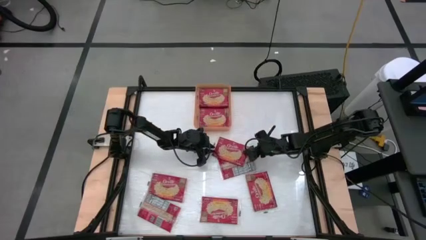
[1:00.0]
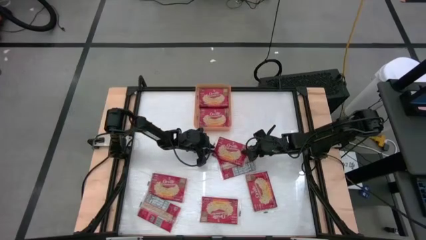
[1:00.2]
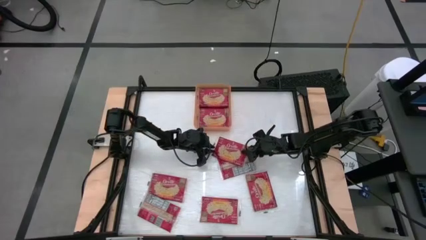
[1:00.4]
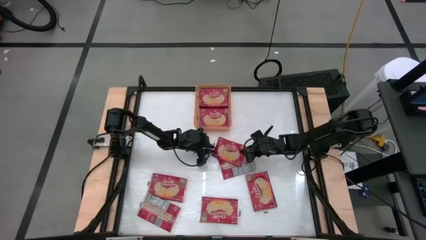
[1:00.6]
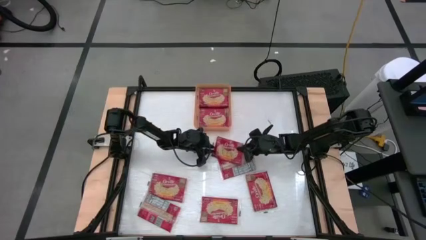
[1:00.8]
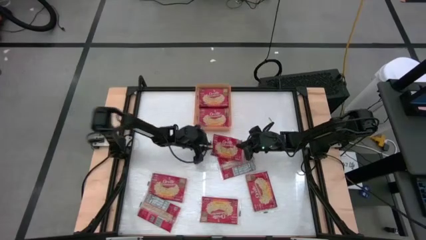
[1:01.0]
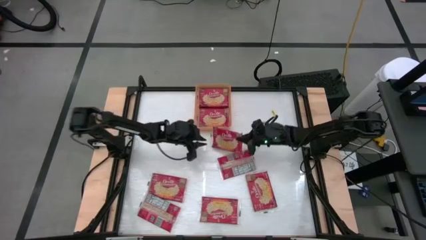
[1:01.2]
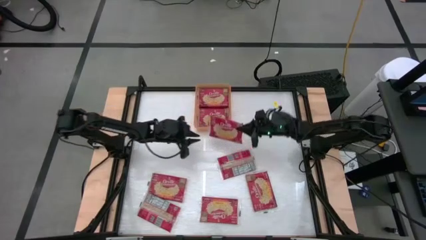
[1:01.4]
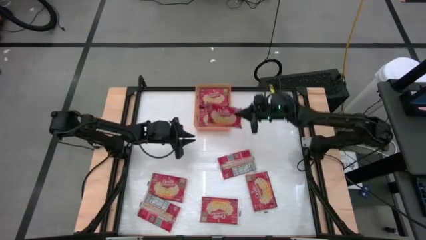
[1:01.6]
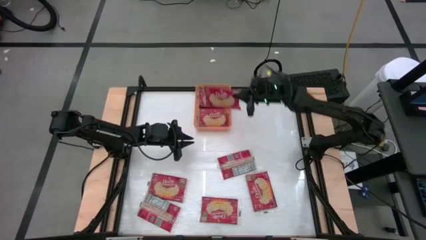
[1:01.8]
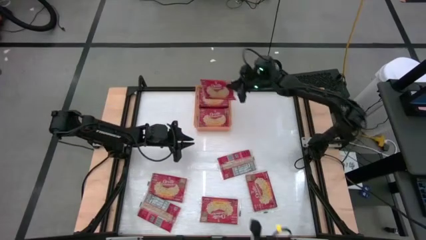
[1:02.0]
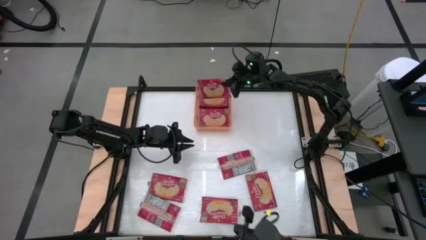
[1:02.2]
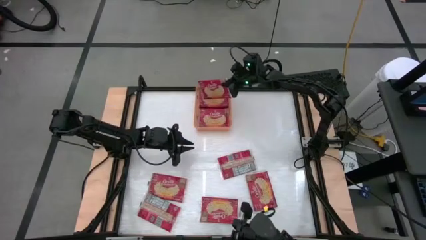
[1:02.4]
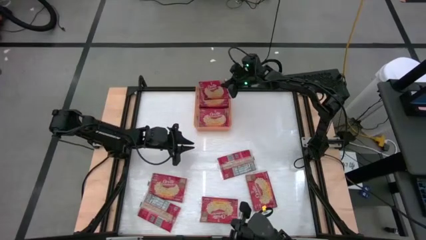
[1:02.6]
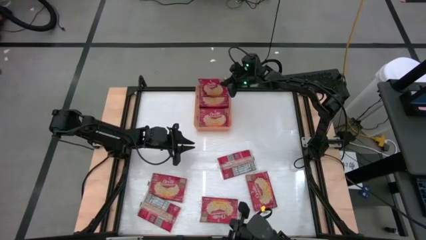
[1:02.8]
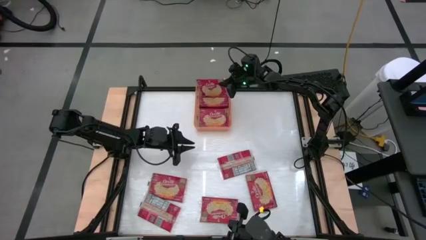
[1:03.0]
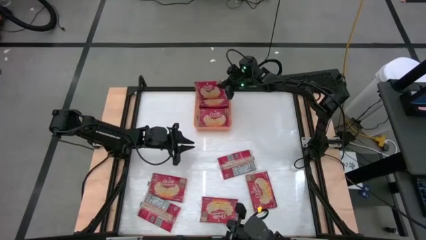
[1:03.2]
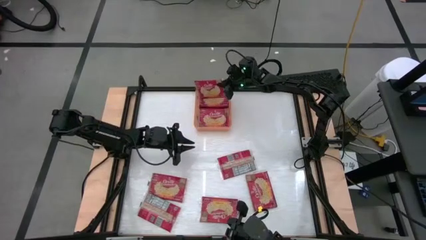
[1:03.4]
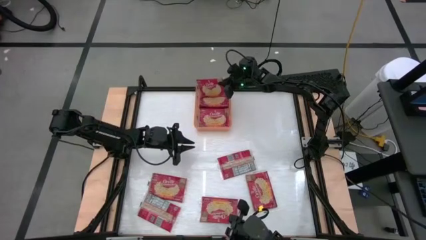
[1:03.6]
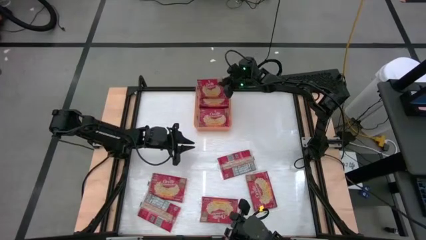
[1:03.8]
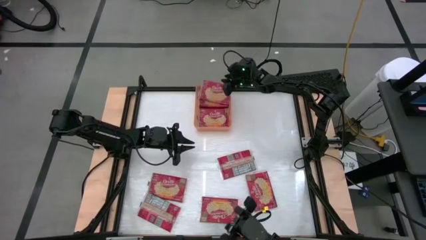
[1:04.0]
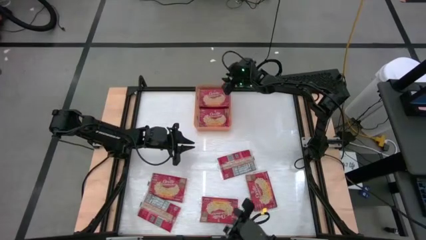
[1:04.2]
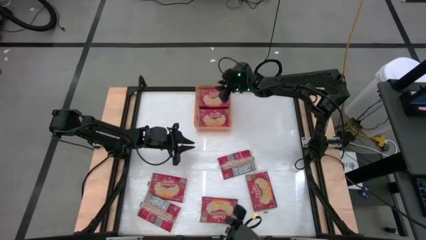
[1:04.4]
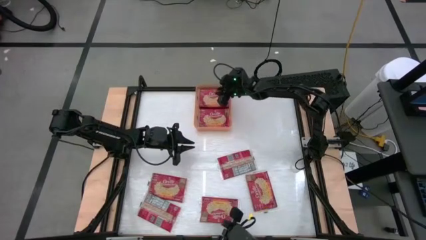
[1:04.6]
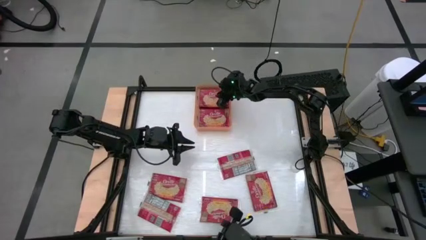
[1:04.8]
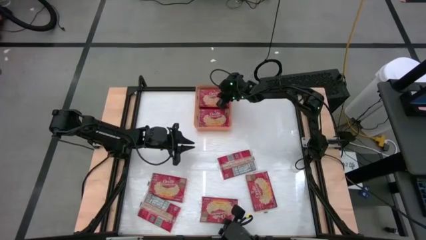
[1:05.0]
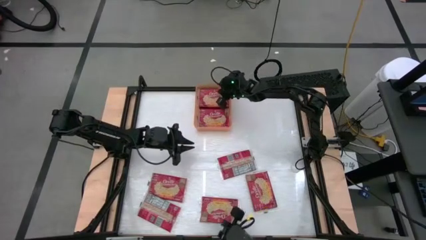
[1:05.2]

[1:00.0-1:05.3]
Task: Sort popcorn bags into baskets
Put the red popcorn bag into the orange bin

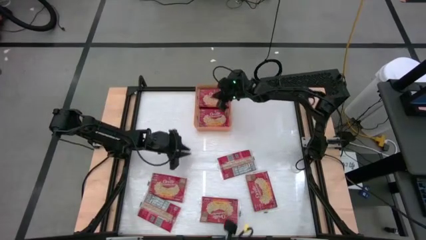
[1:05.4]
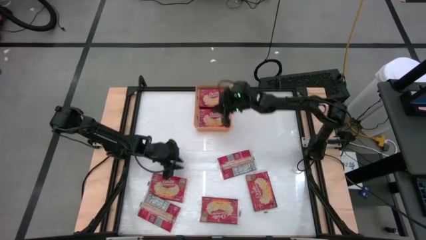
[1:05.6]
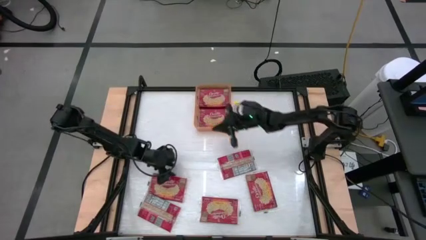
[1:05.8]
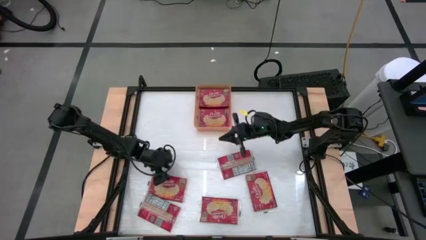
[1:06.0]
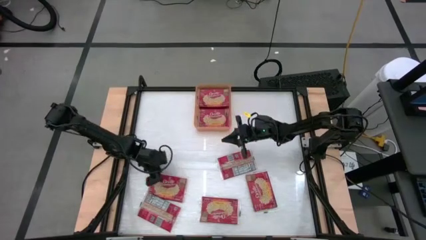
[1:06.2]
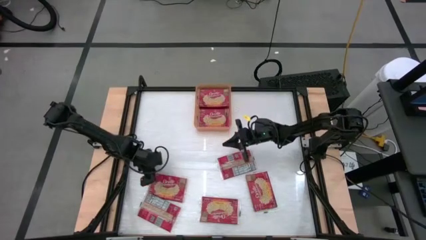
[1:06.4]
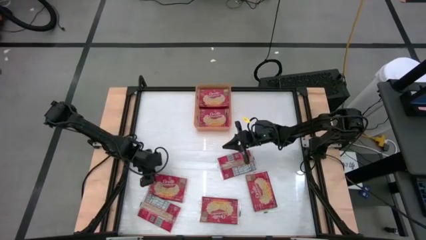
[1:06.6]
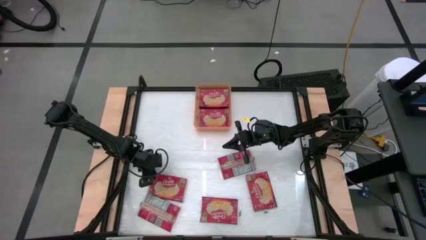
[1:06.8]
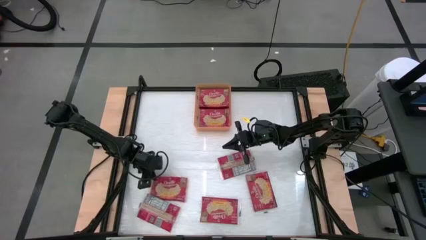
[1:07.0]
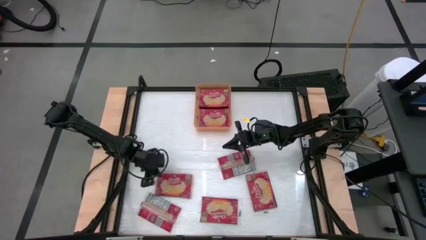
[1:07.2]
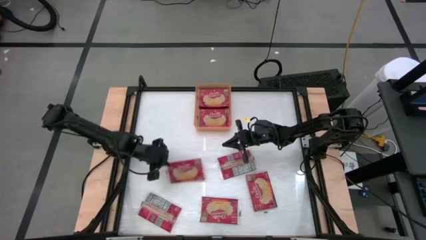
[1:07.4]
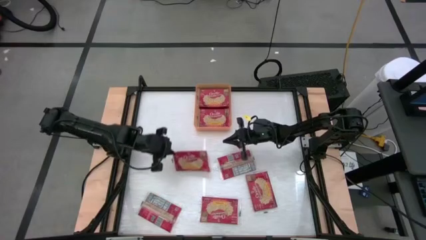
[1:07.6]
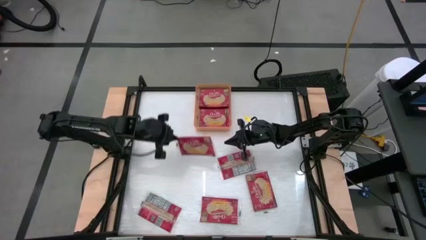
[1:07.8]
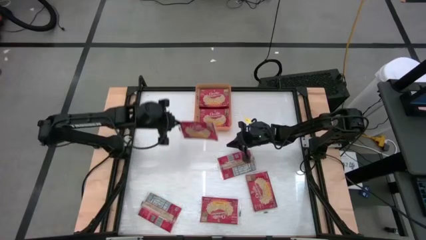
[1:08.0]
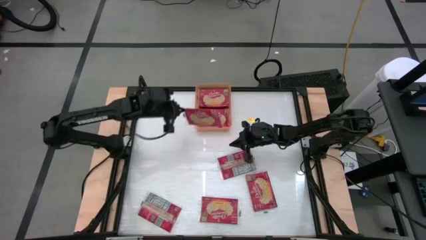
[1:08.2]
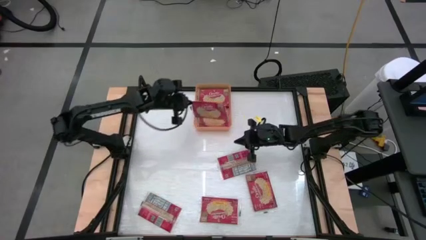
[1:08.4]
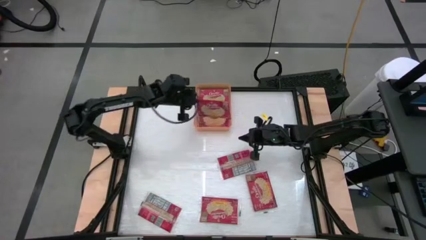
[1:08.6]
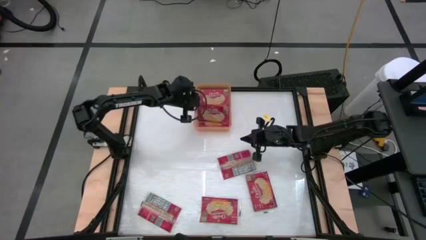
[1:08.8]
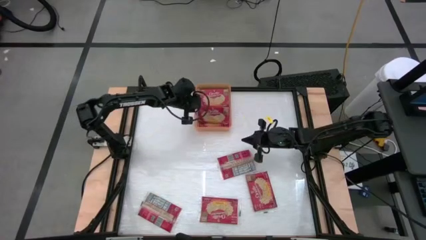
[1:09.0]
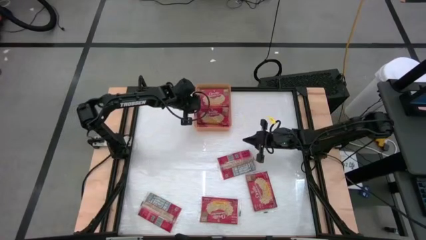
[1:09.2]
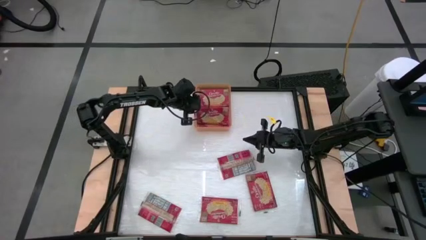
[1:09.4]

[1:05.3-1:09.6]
Put the red popcorn bag into the orange bin

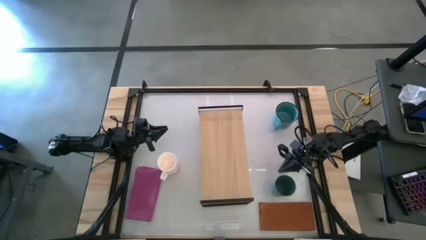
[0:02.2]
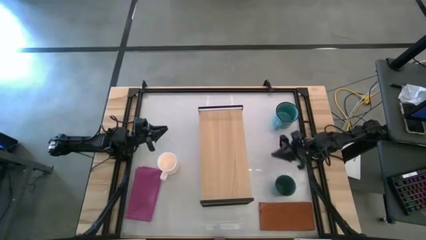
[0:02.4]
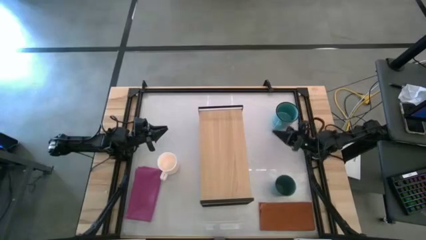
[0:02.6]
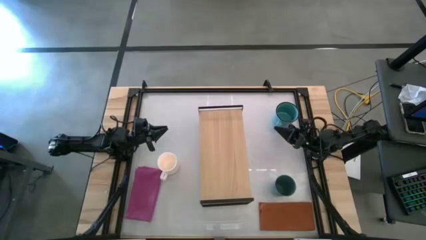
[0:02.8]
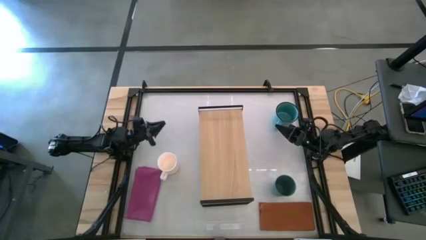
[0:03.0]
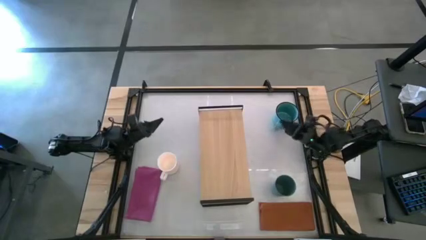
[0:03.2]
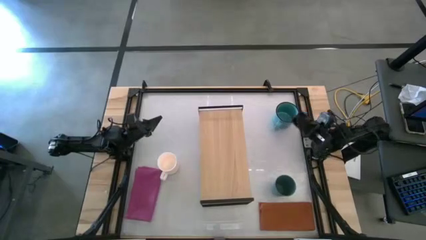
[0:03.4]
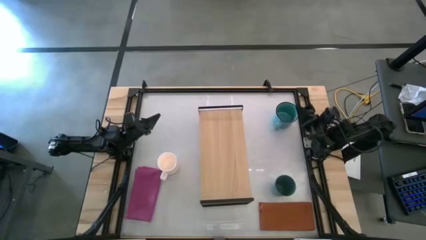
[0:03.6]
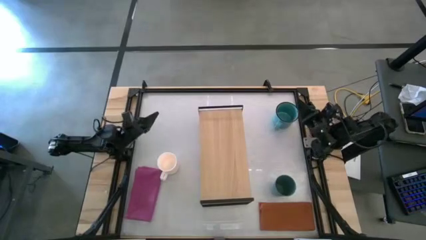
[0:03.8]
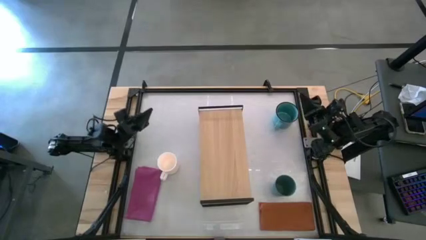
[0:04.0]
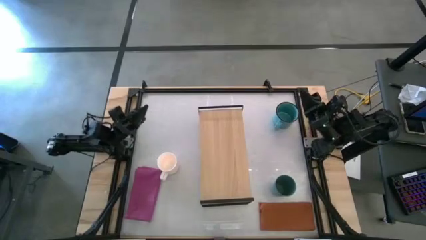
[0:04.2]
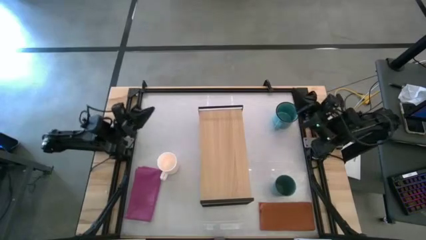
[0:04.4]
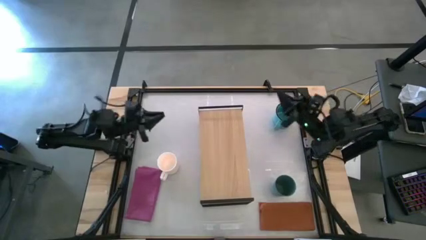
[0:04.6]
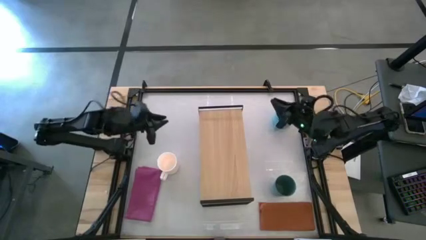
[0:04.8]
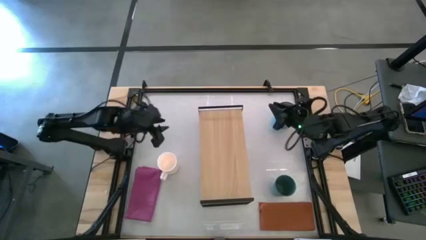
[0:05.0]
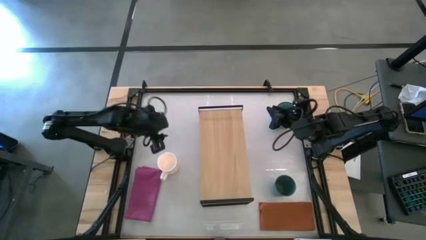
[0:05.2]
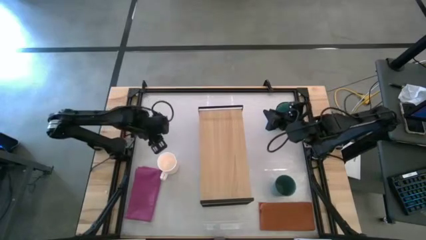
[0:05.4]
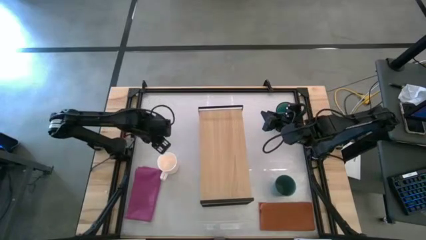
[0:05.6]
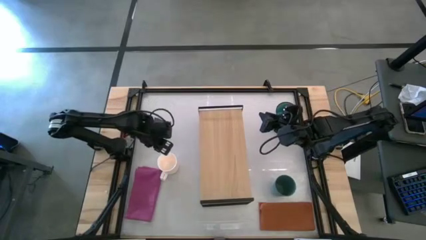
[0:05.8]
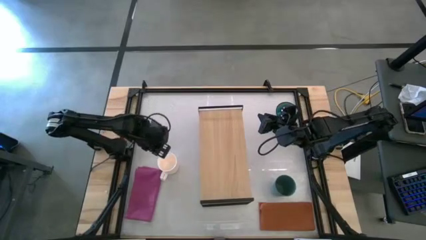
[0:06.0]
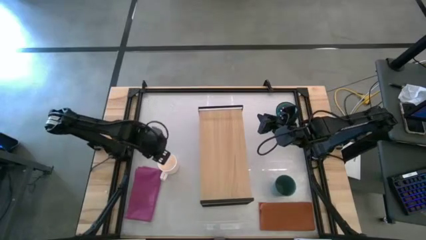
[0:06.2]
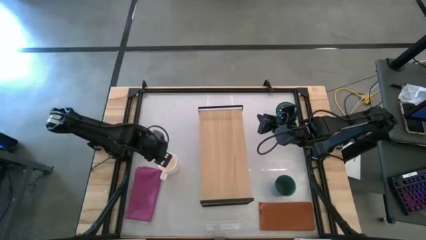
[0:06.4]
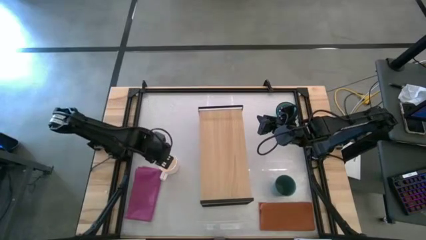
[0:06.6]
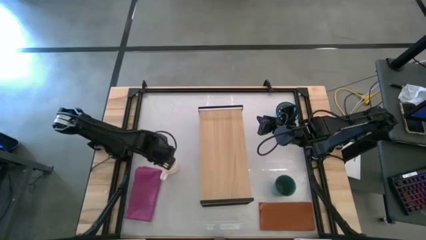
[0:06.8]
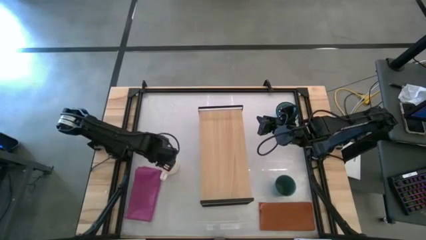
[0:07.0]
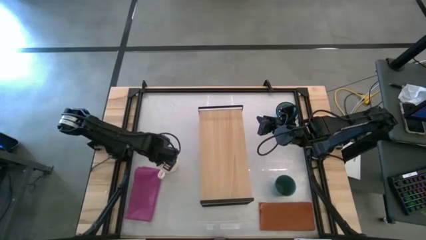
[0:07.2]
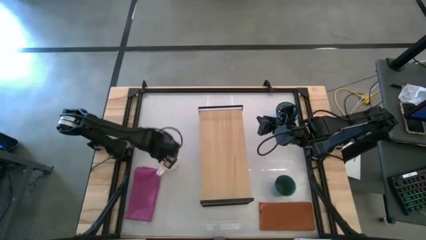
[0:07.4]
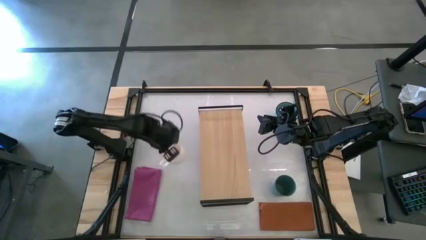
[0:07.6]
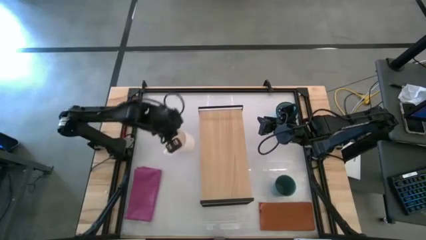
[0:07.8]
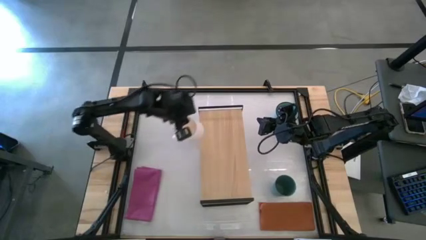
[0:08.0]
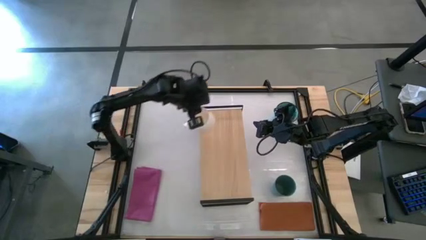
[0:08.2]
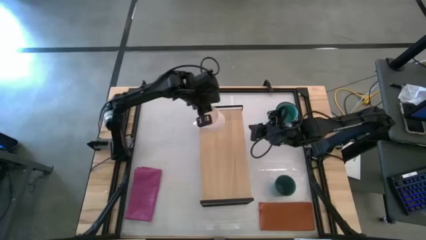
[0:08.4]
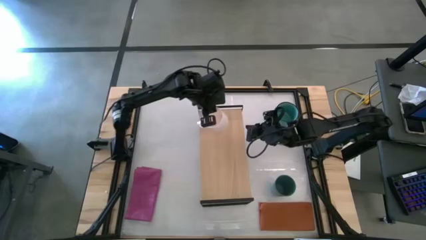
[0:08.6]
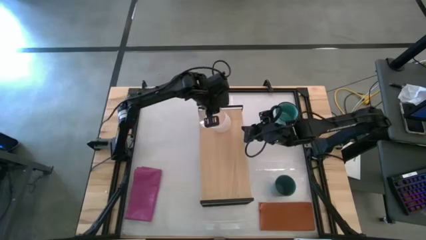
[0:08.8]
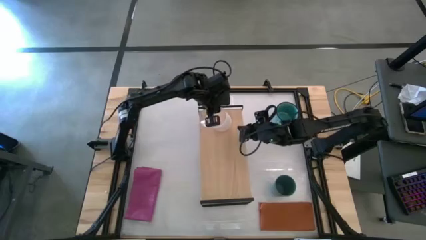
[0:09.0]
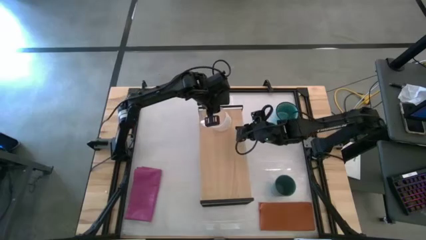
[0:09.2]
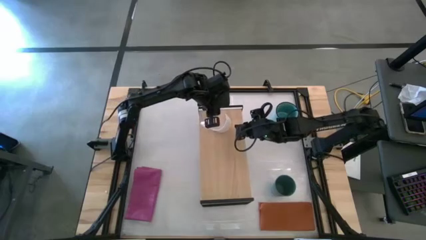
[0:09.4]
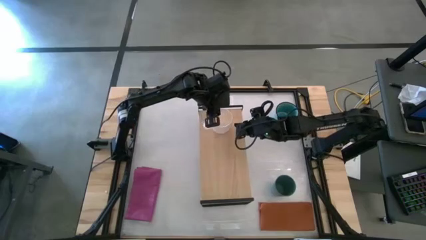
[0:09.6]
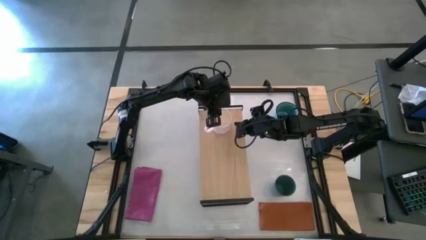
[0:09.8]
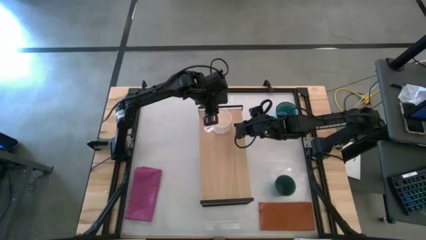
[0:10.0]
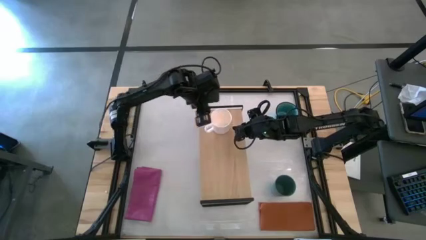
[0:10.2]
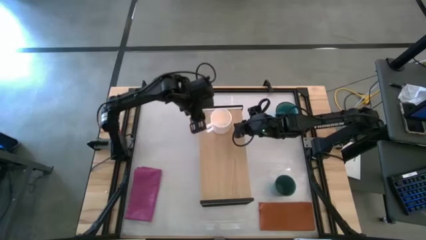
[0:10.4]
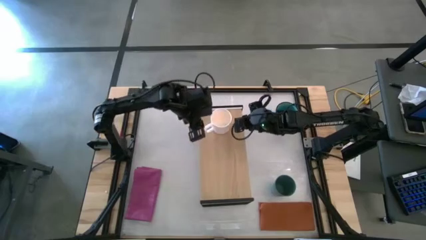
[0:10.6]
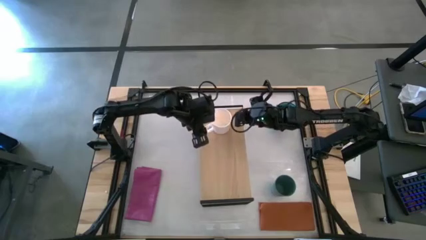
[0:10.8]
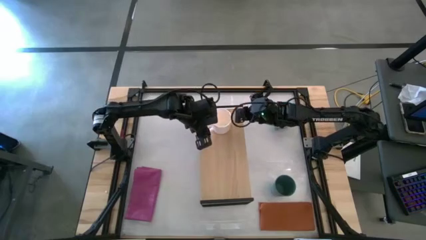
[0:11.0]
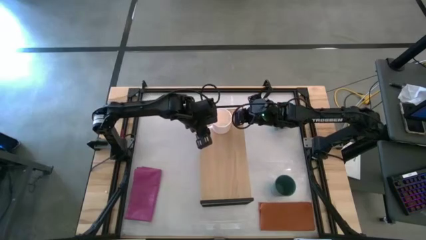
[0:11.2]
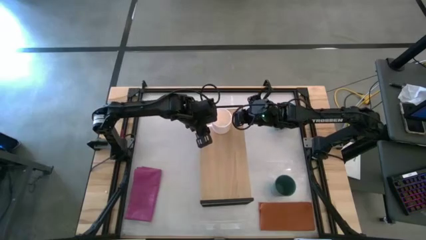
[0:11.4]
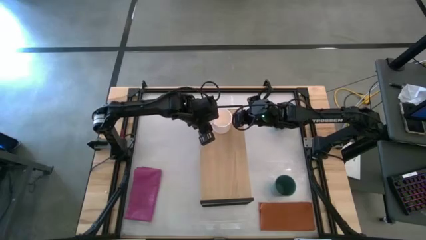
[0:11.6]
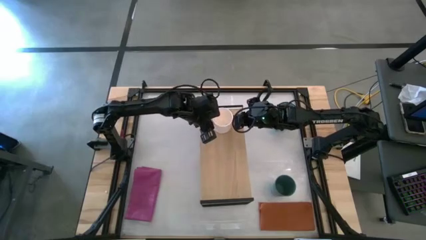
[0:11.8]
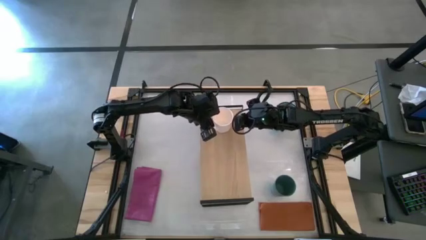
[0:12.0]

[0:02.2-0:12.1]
Task: Stack small to large cups/mugs on shelf
Put the white mug on the shelf
